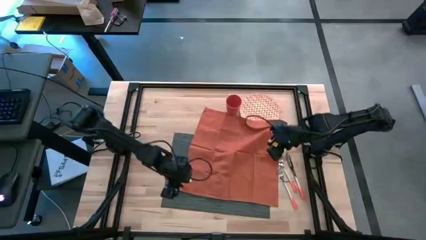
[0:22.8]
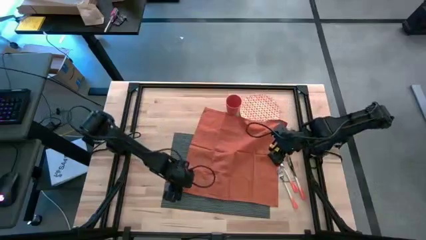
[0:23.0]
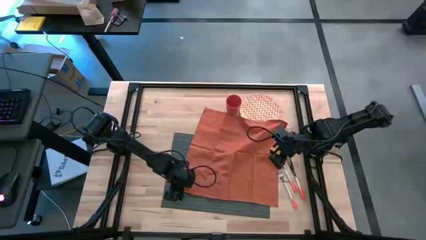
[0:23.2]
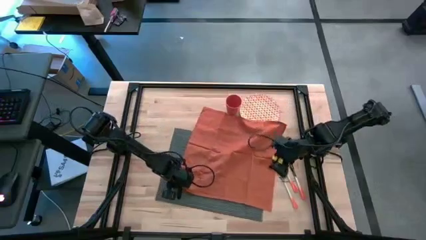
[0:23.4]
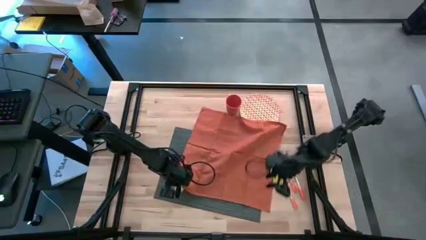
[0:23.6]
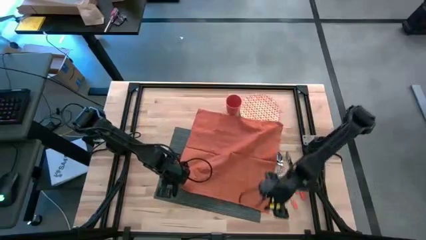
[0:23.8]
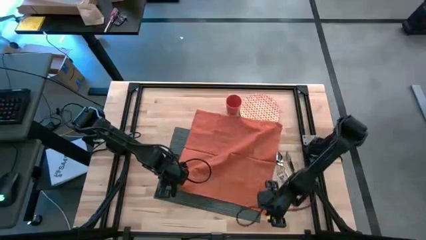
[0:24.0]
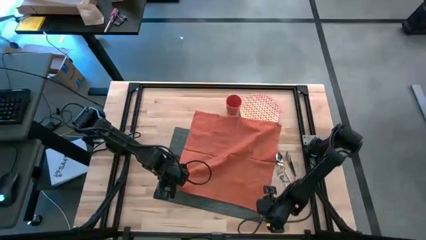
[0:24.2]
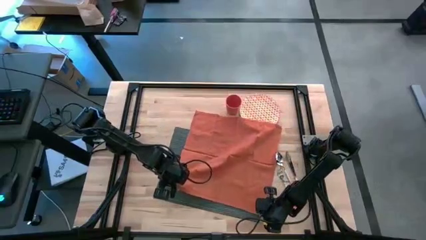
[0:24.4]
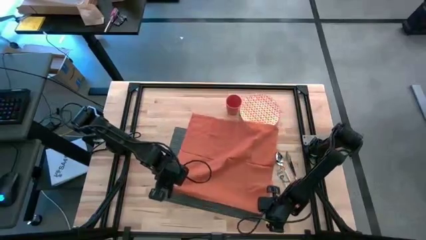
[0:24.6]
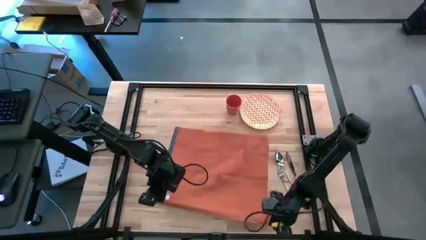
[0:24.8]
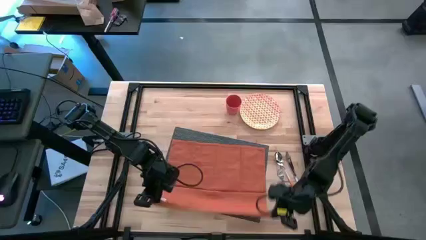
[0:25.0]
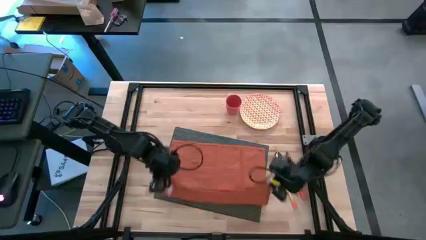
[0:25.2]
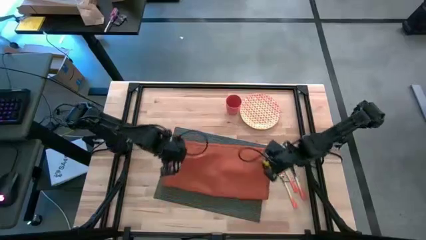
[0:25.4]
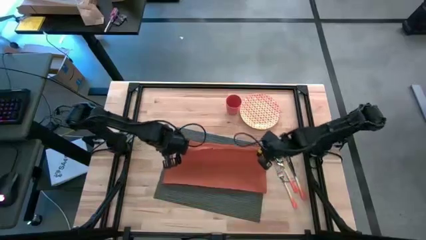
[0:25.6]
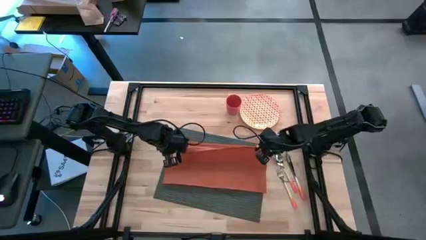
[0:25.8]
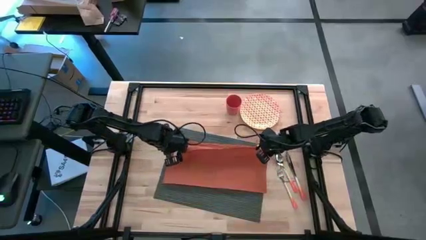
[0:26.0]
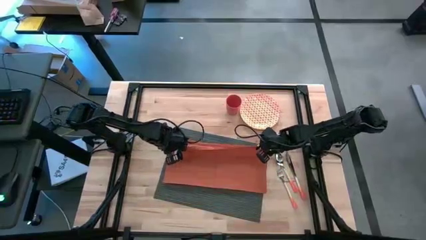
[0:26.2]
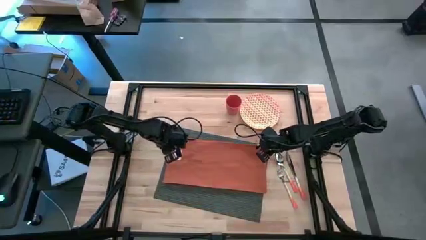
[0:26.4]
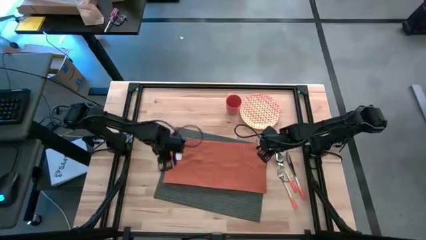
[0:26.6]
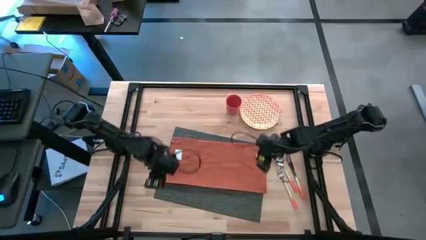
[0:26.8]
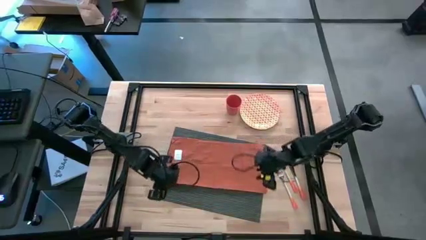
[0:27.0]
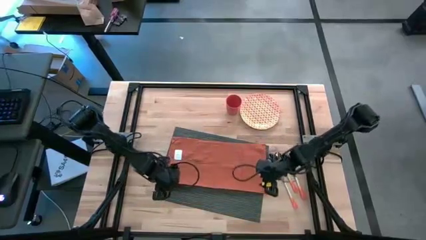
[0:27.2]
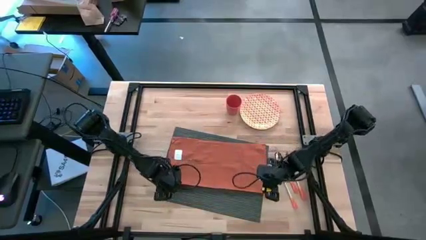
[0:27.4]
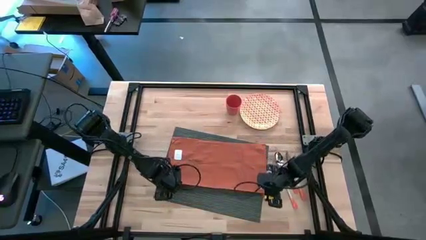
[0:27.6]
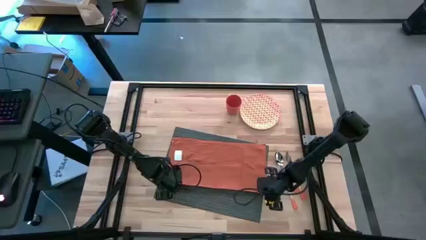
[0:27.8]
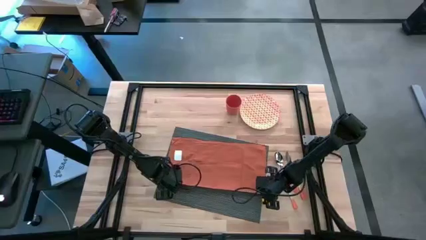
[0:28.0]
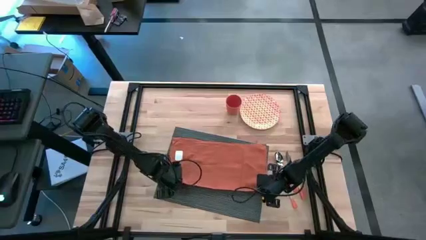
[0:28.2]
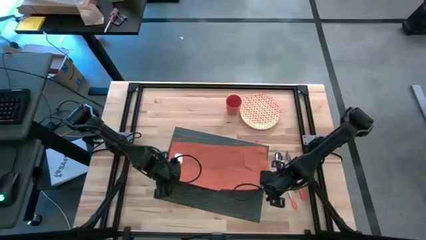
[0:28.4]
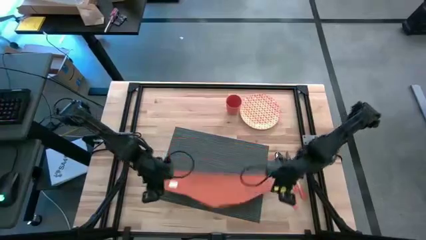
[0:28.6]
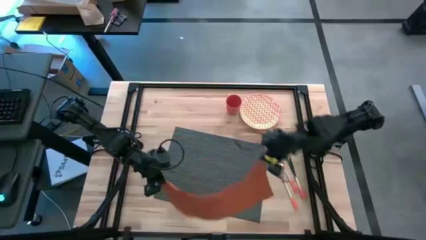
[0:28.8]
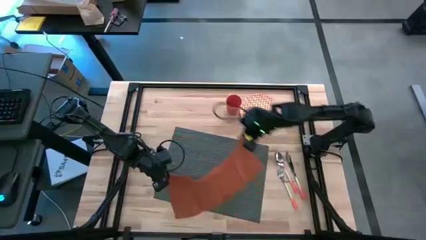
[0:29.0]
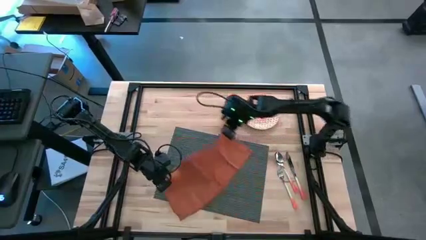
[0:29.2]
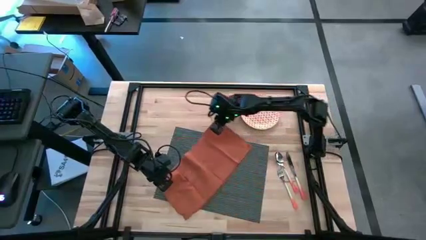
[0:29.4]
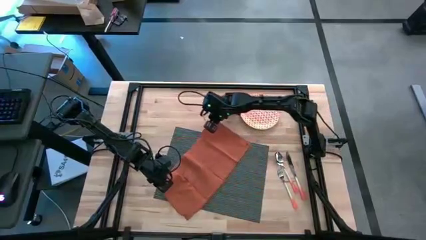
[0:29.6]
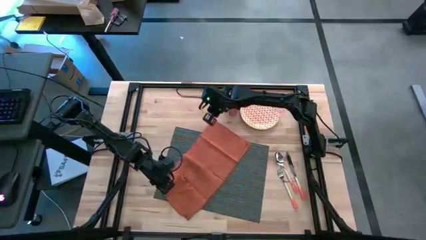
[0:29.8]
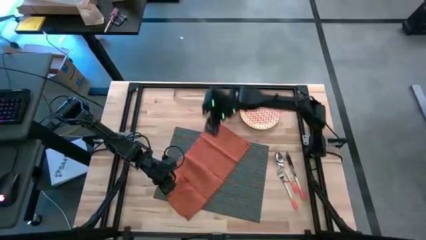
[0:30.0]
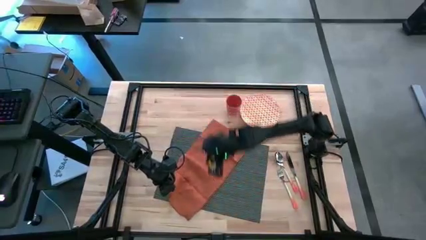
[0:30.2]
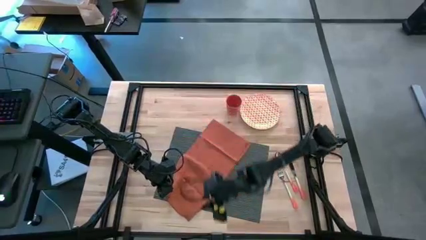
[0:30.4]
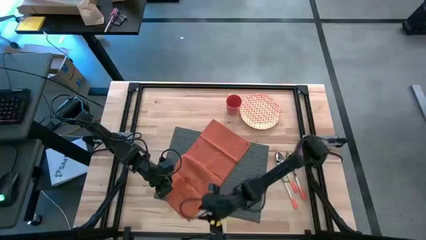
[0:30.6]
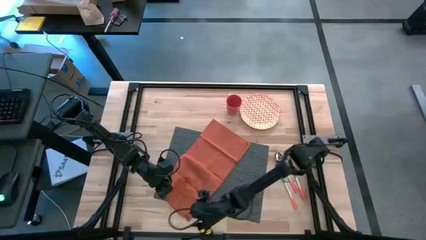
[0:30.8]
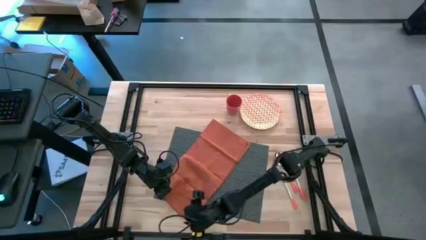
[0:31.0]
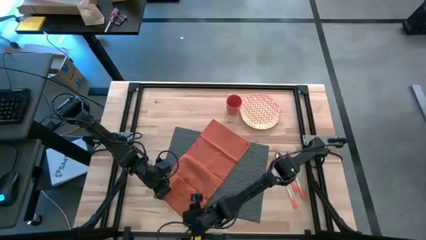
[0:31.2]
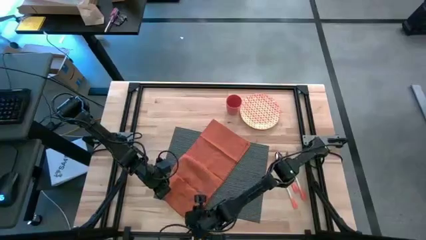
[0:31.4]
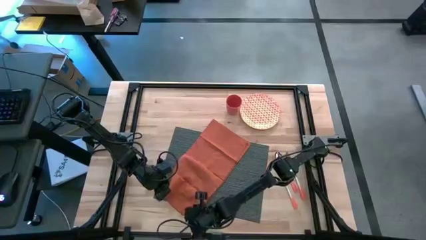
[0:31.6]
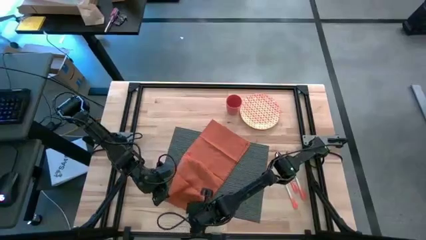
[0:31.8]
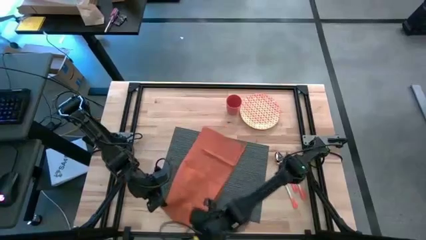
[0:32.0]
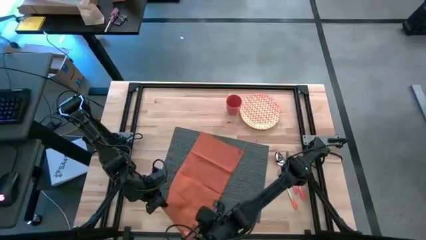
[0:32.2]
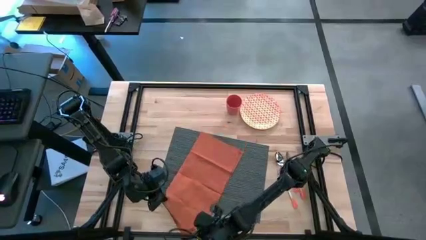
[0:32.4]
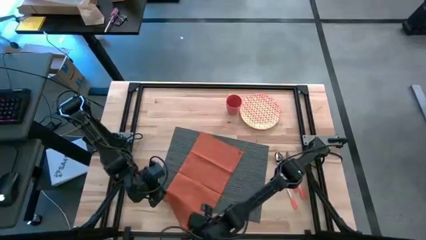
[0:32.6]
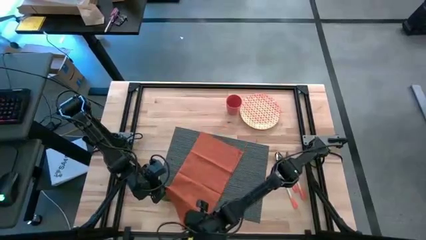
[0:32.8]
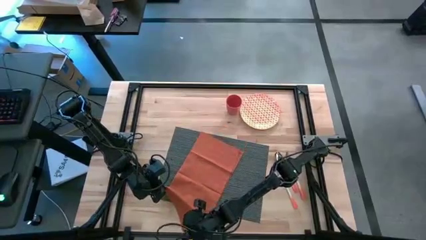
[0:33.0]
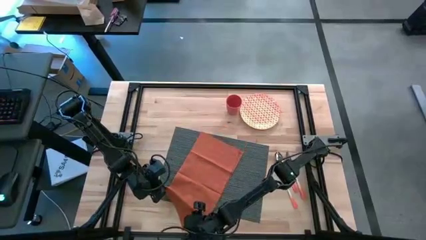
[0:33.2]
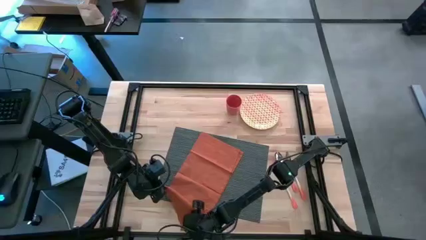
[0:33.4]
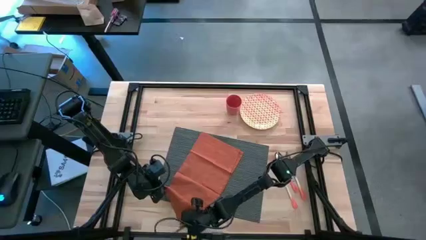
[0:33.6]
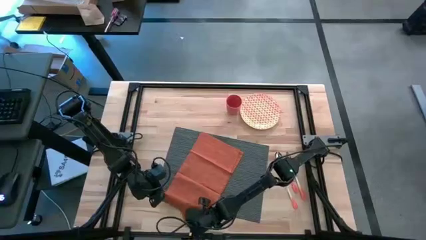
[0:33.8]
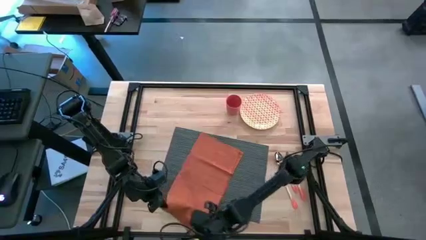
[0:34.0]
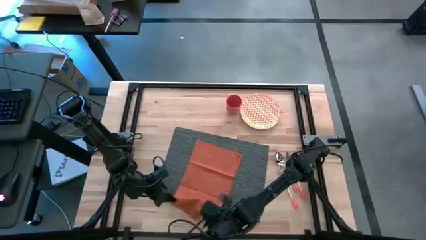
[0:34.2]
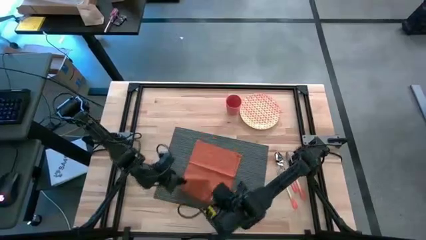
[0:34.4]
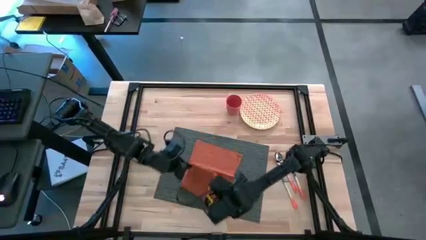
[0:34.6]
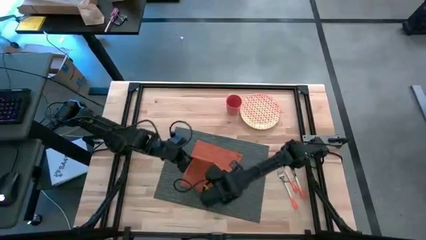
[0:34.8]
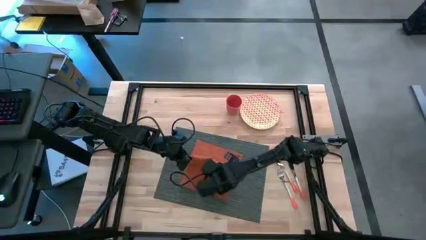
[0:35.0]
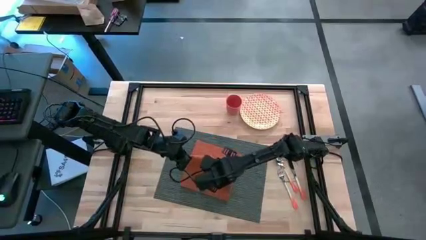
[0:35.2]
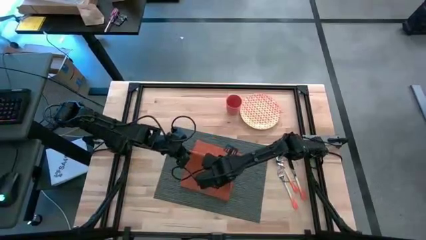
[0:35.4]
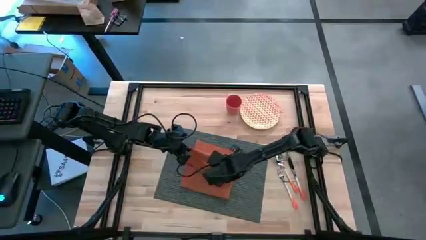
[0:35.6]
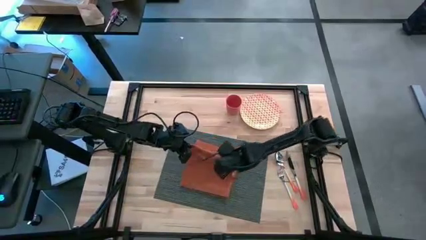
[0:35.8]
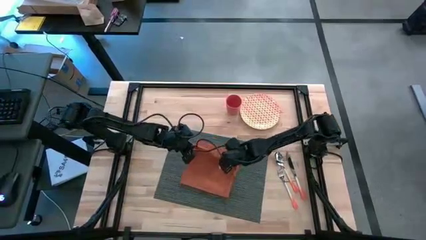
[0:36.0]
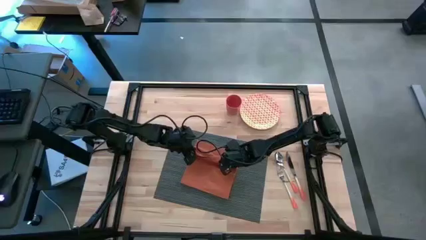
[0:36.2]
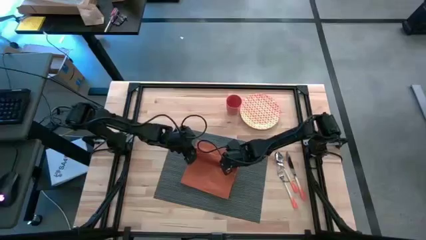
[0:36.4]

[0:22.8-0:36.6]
Task: Set table place
Fold the orange table napkin

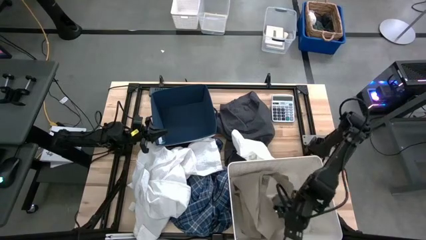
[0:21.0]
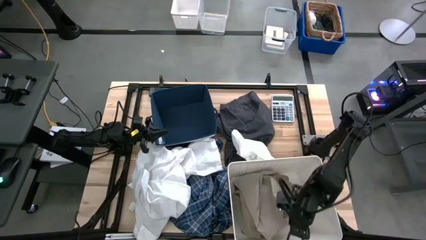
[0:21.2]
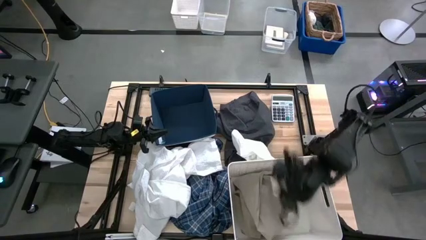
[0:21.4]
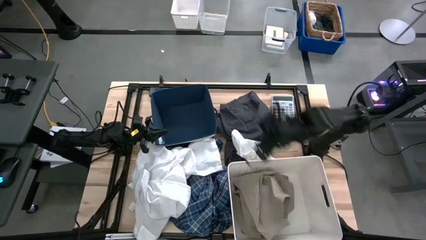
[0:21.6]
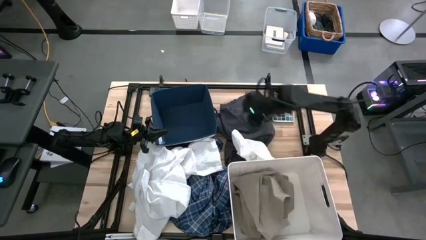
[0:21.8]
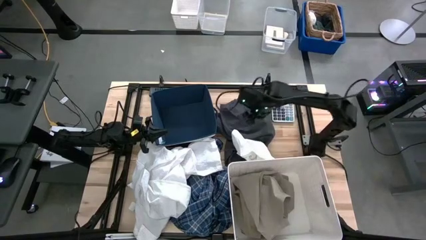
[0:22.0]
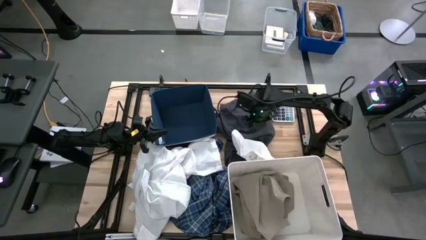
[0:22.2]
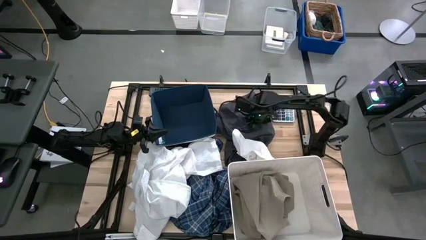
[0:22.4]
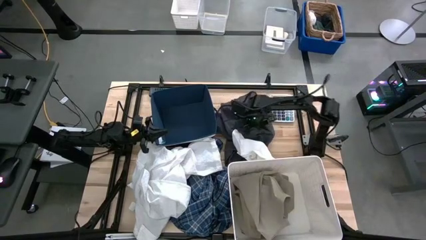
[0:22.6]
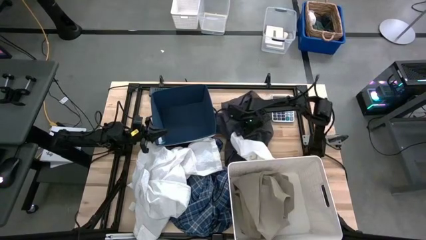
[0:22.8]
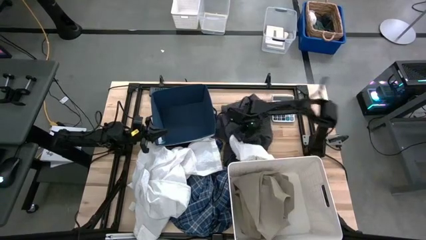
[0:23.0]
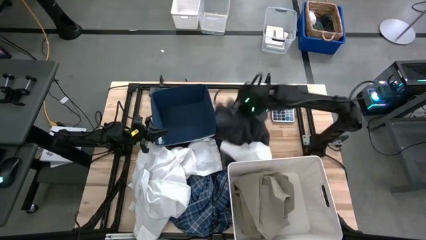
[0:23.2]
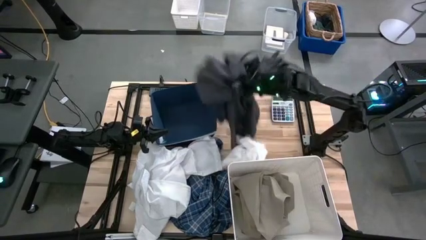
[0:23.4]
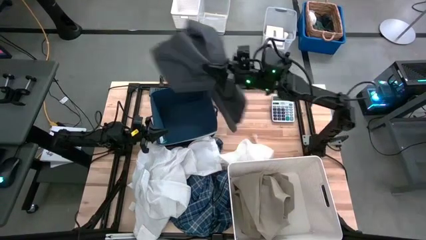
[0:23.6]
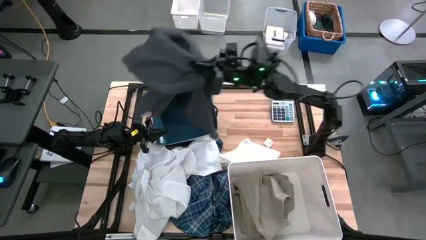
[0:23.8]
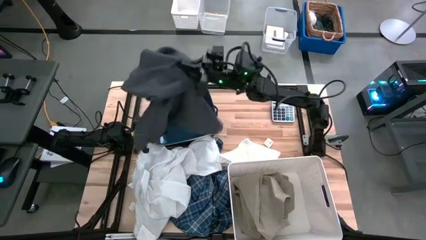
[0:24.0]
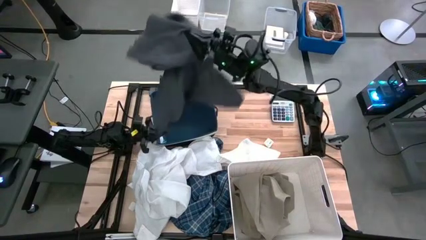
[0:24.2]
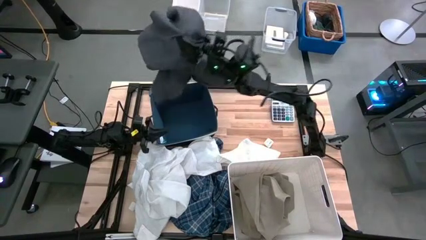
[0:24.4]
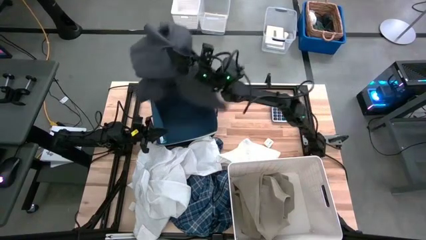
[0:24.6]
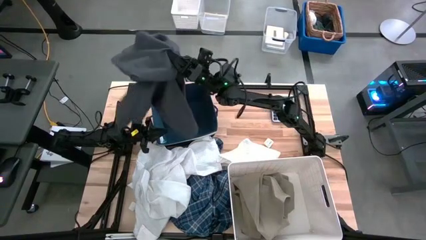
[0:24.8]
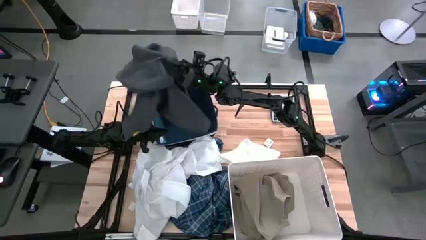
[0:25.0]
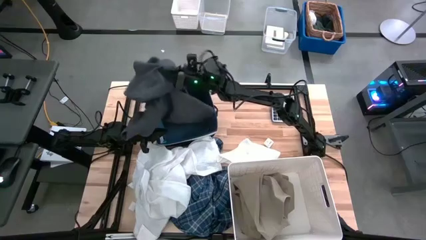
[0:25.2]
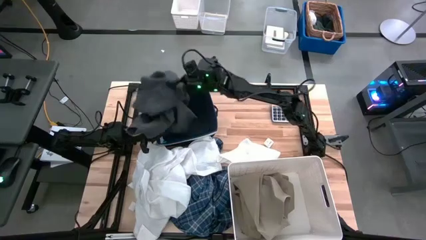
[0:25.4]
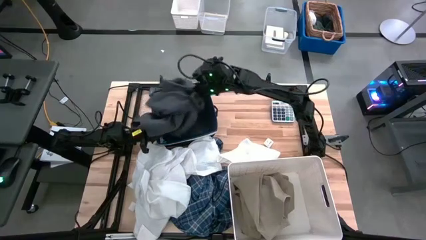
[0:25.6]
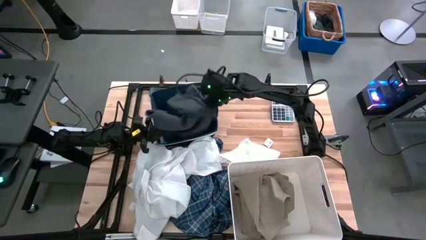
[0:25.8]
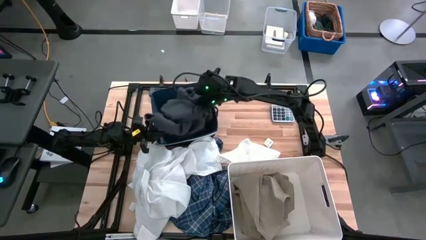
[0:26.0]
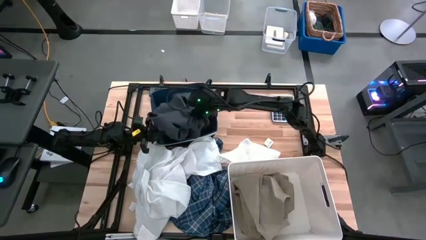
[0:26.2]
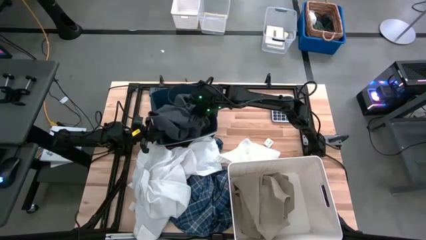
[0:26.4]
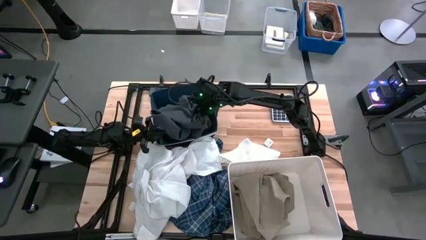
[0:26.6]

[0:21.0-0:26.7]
Task: Sort clothes
Put the gray shorts into the blue laundry bin
